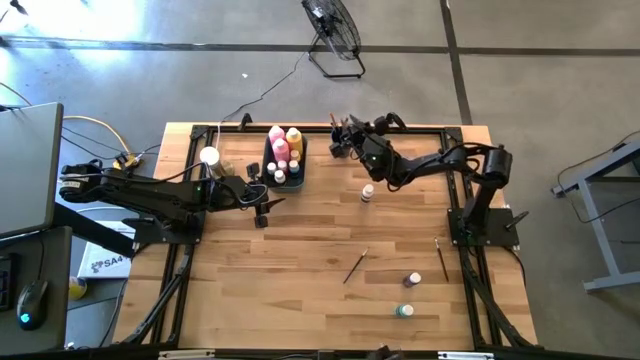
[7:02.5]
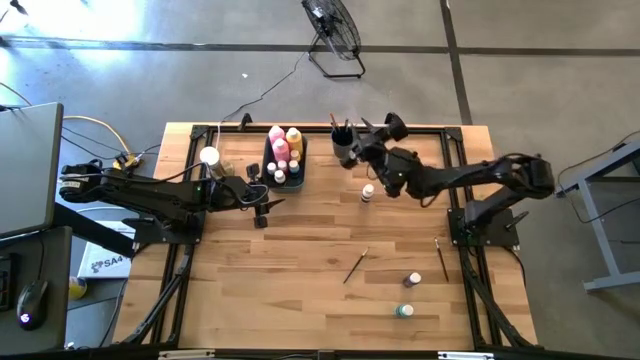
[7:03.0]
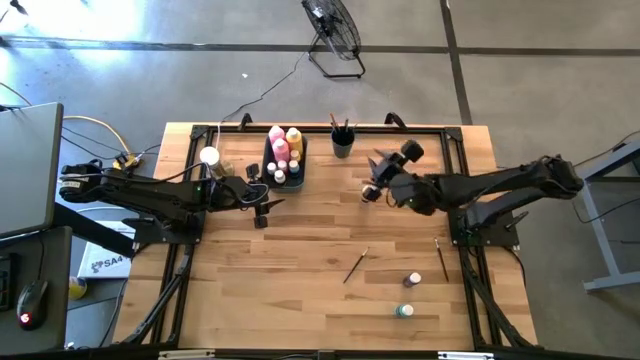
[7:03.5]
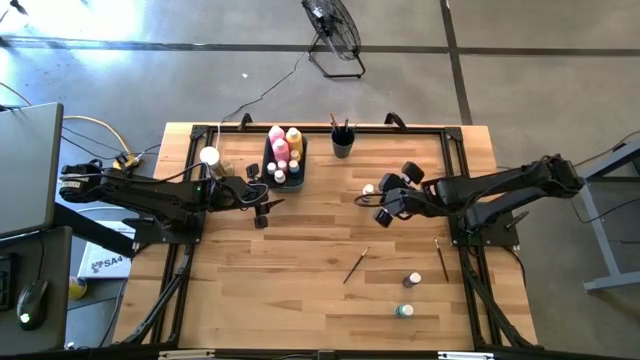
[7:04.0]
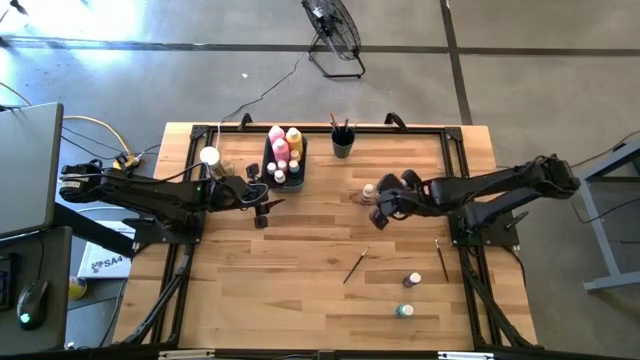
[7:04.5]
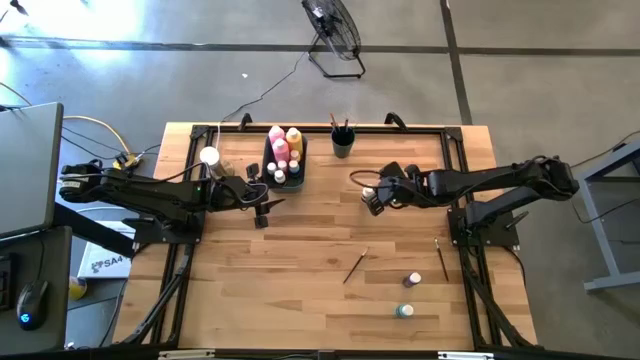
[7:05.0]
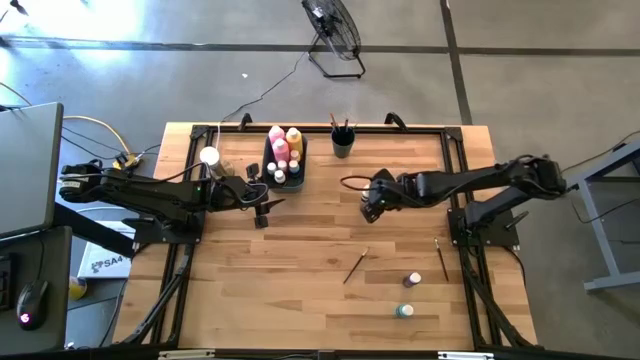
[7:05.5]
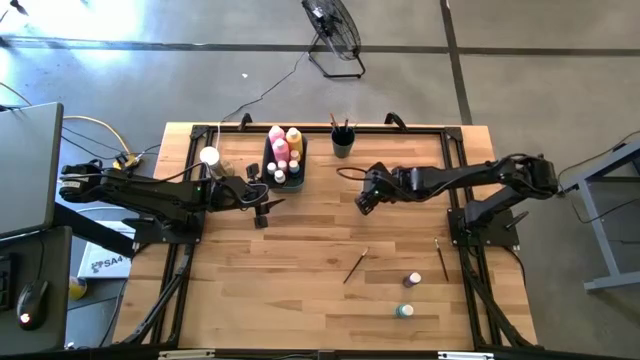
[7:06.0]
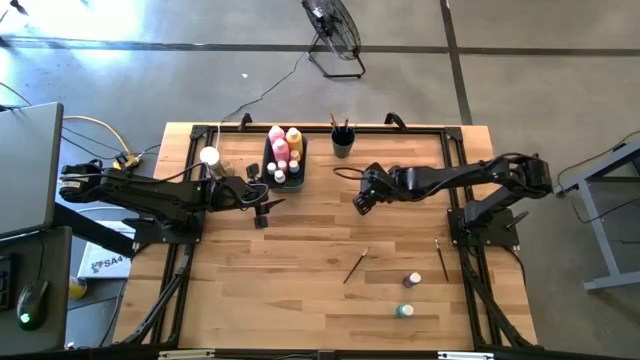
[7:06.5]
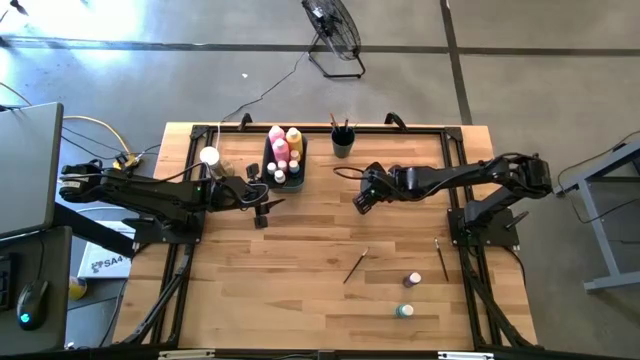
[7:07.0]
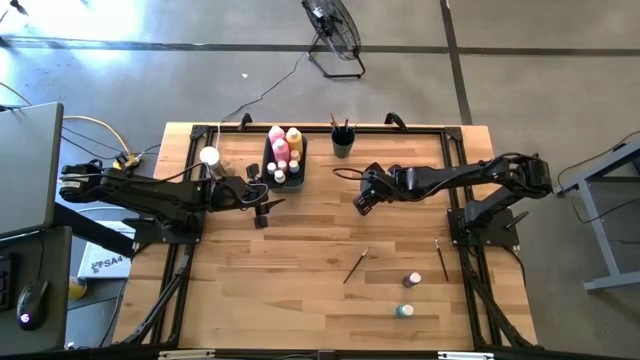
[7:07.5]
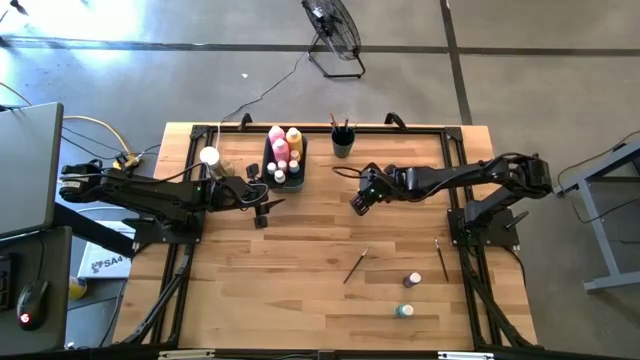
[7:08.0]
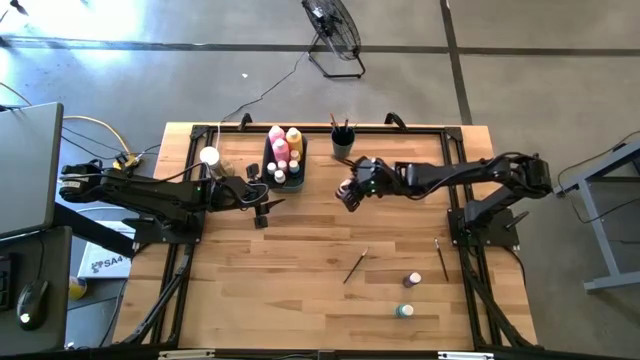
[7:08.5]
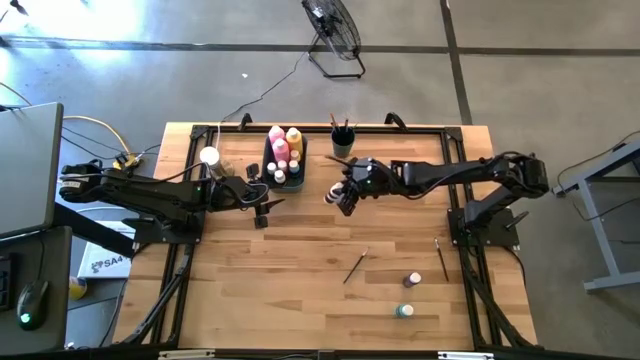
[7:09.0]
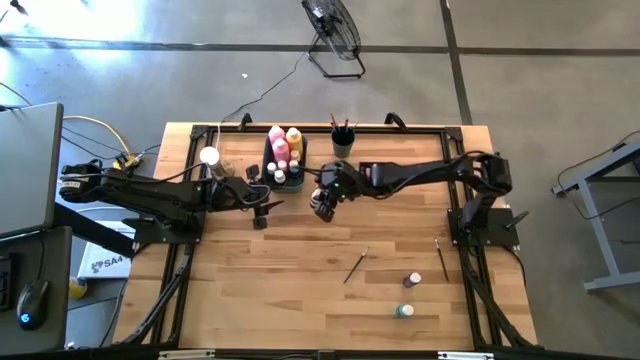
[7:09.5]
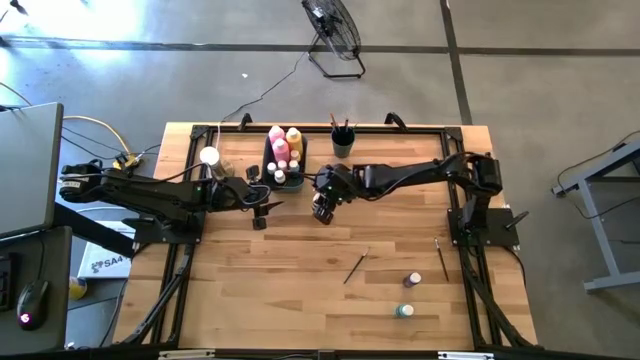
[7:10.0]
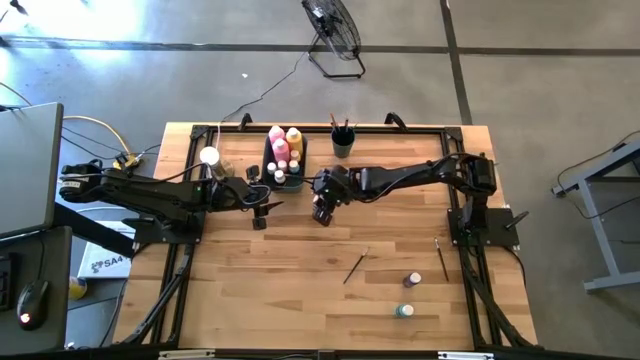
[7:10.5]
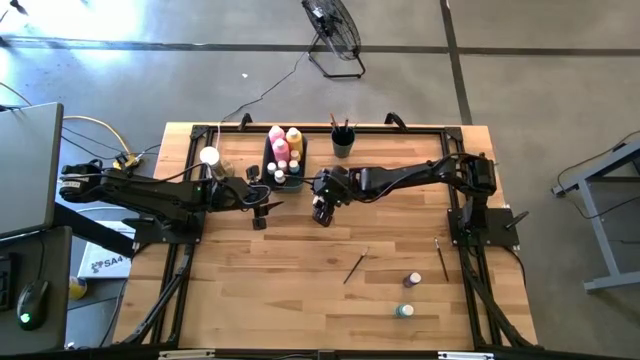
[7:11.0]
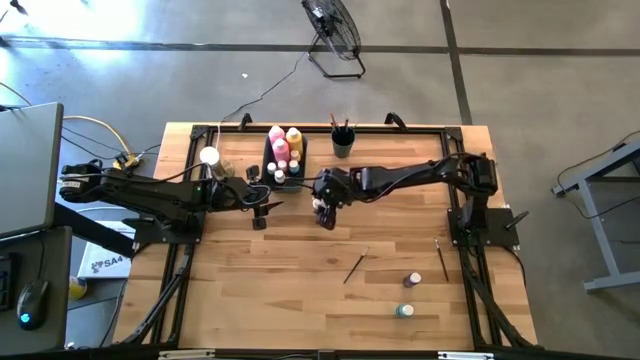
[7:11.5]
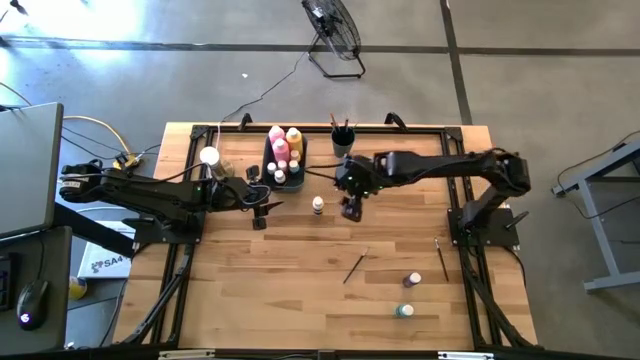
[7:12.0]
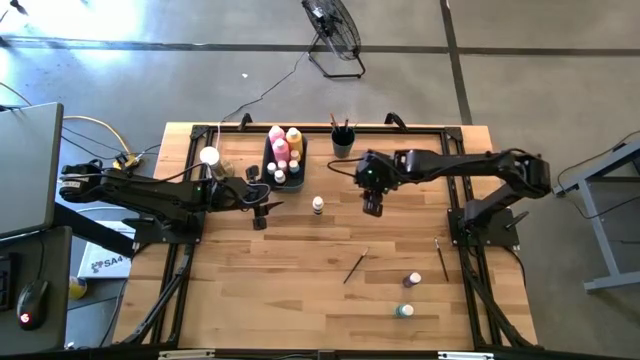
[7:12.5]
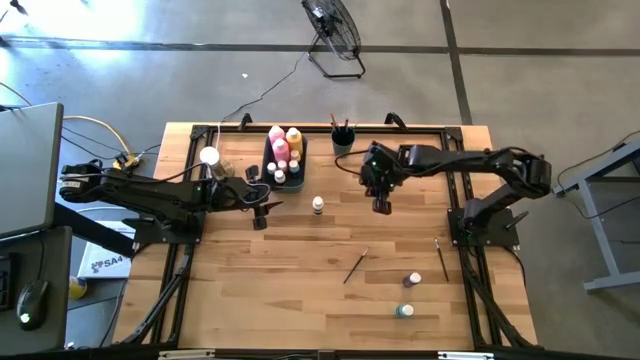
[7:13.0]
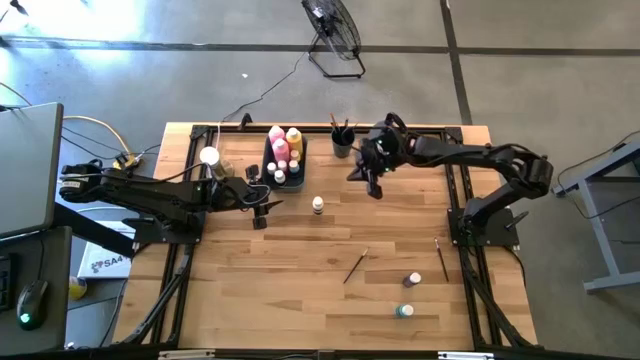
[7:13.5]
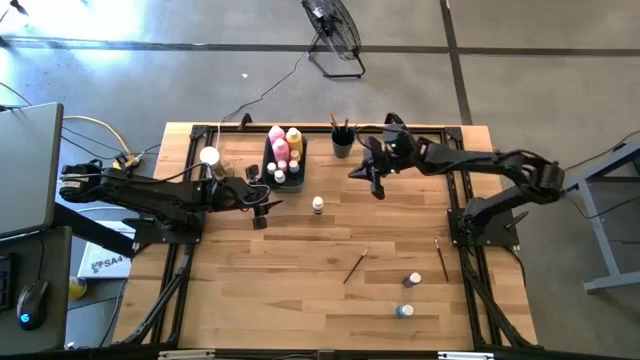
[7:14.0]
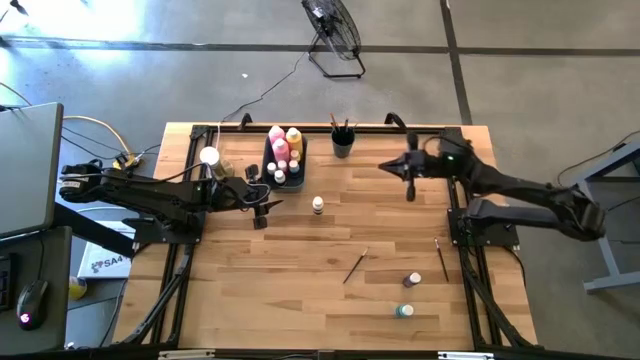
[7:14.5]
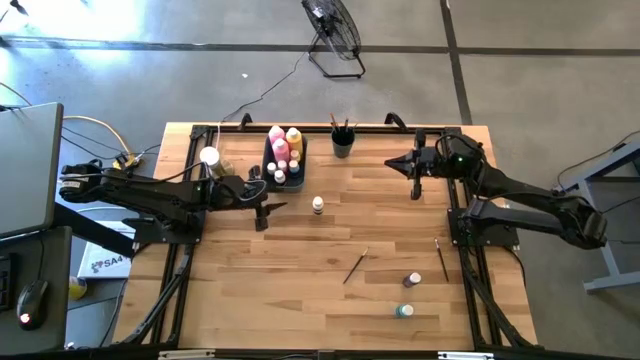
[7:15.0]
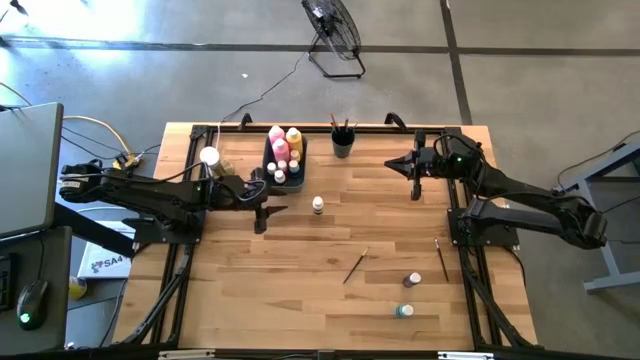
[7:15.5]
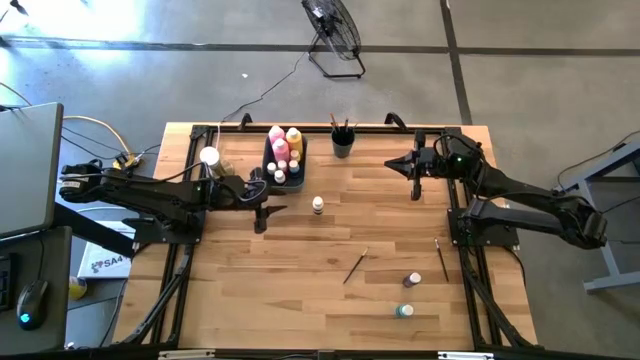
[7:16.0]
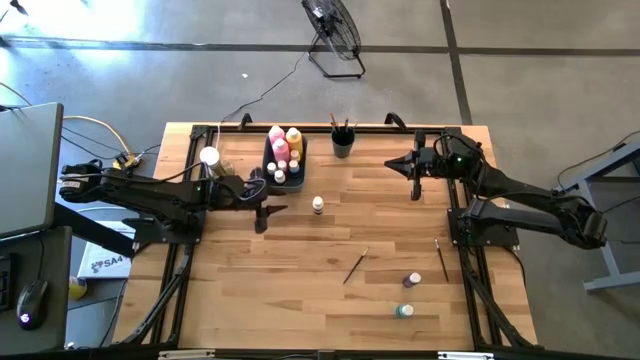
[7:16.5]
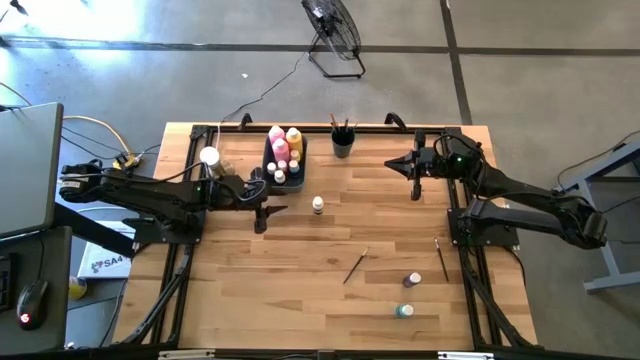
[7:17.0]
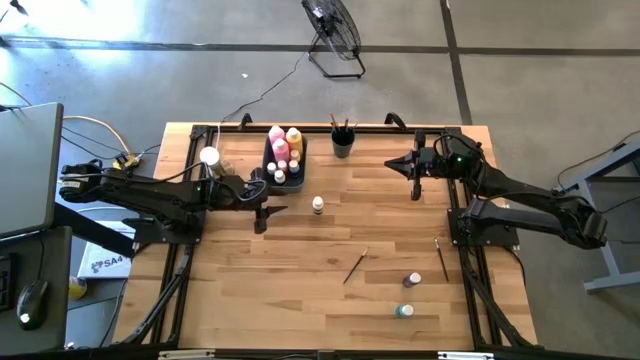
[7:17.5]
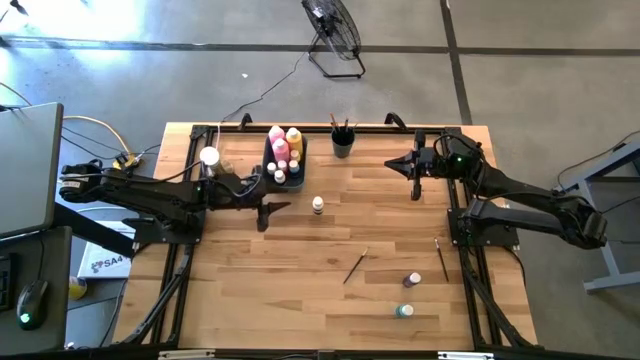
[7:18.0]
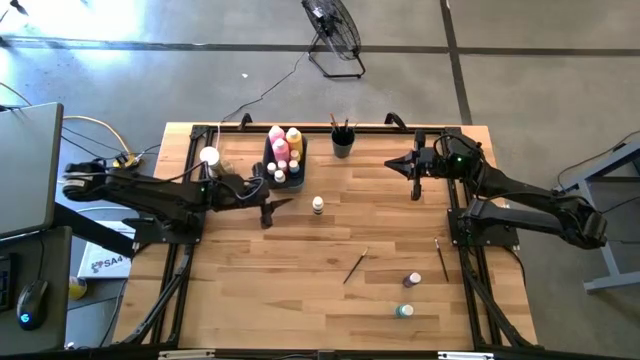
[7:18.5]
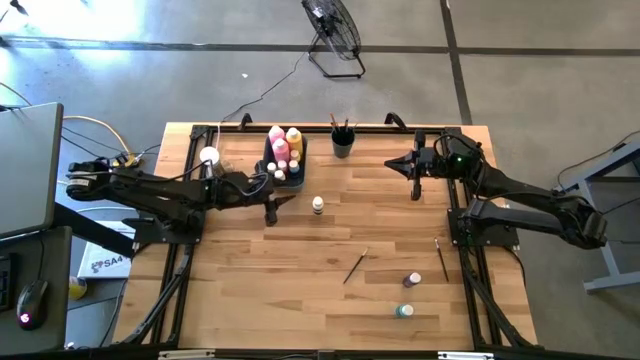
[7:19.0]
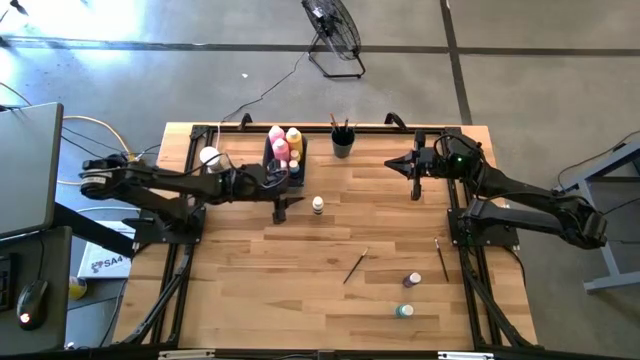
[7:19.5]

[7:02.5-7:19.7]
Task: Pick & Place Paint Supplies
Put the small white paint bottle into the green bin
